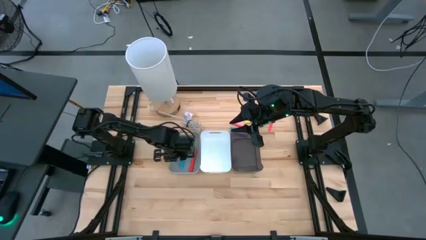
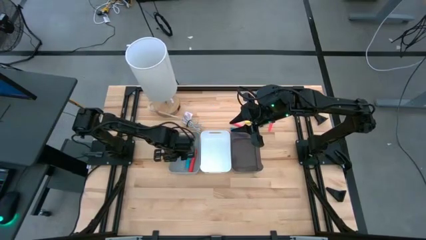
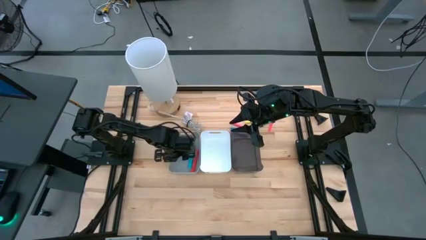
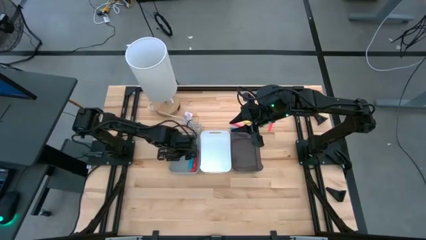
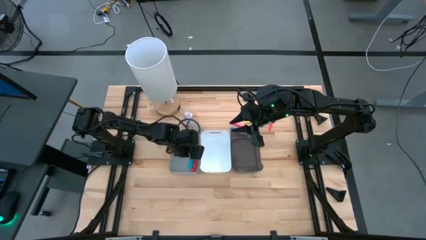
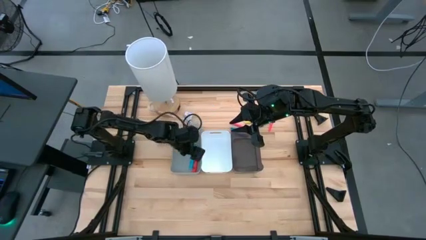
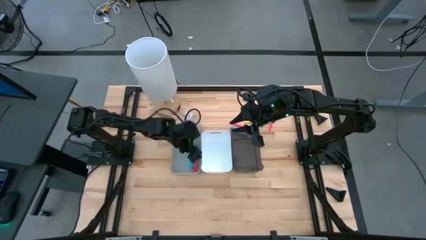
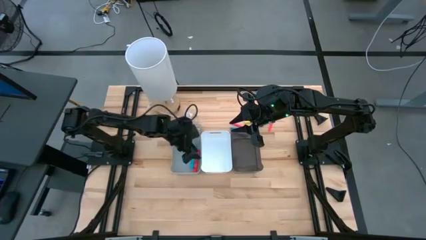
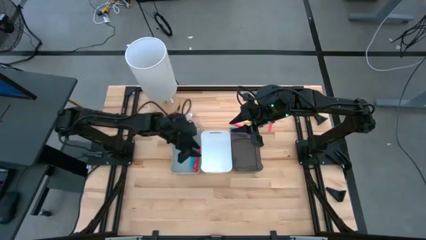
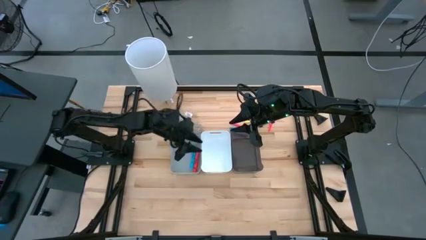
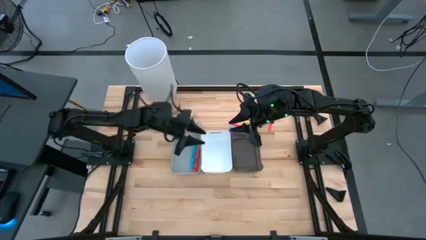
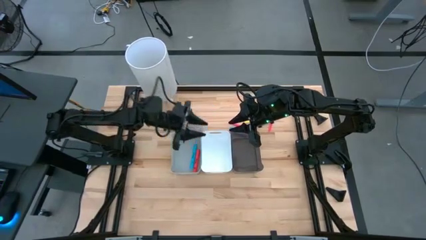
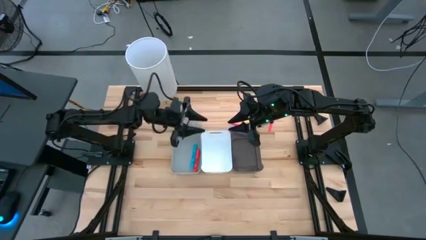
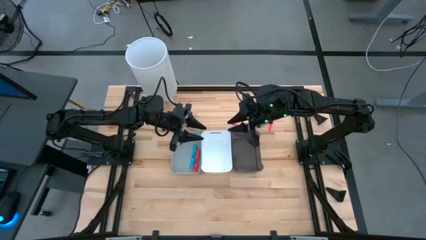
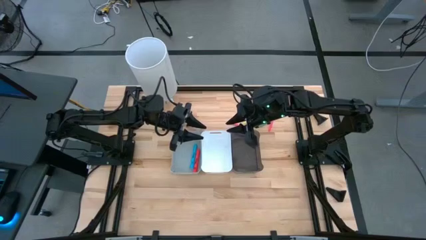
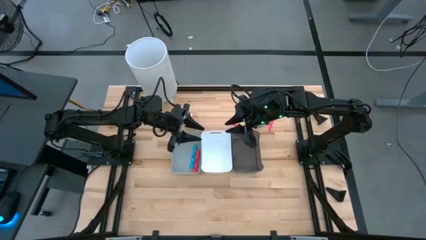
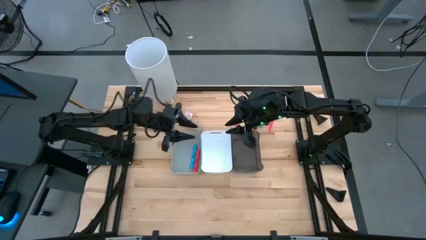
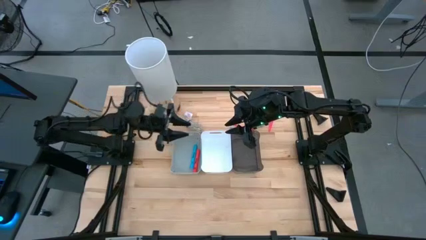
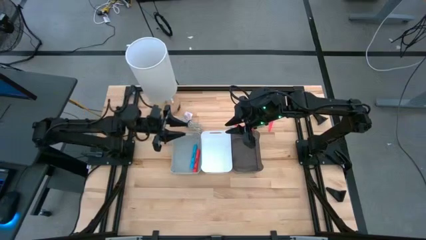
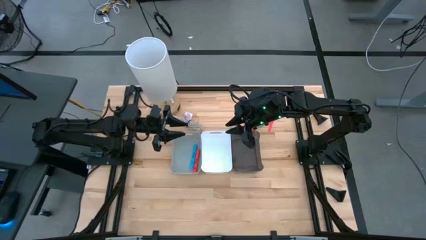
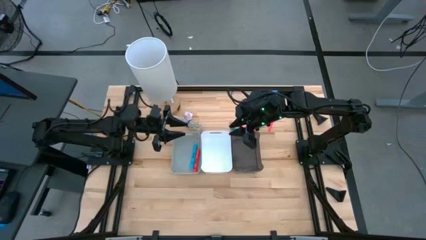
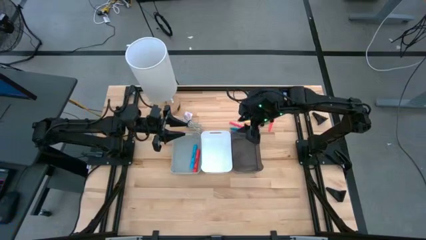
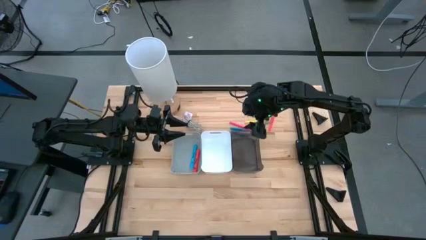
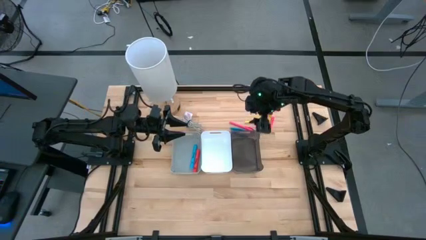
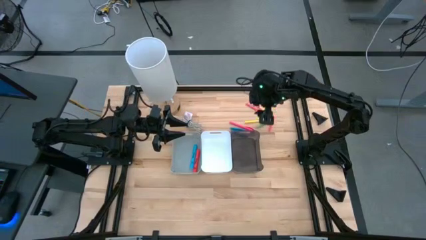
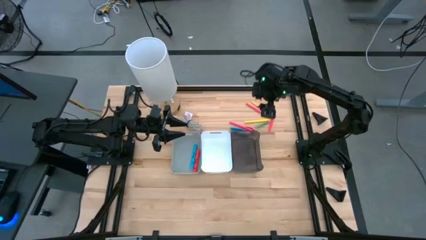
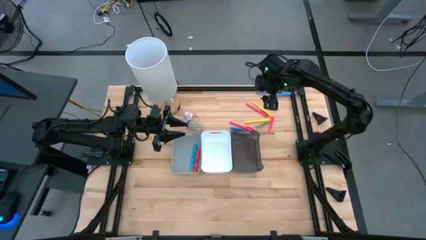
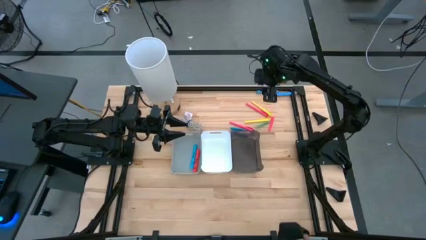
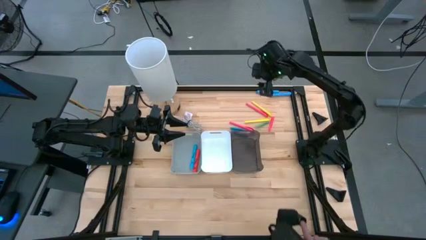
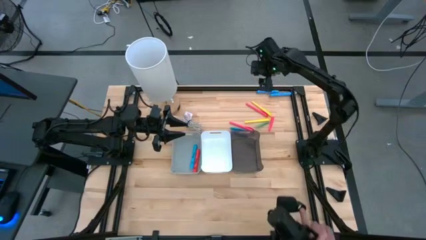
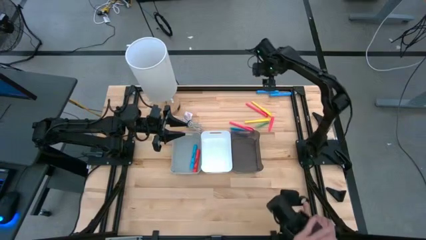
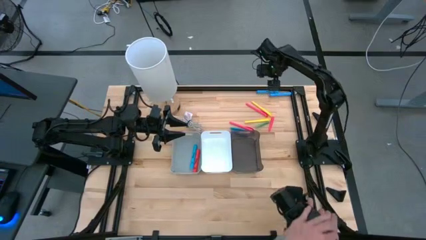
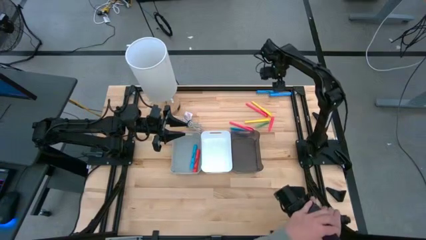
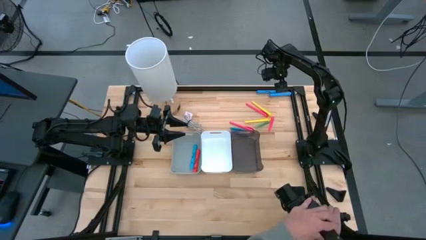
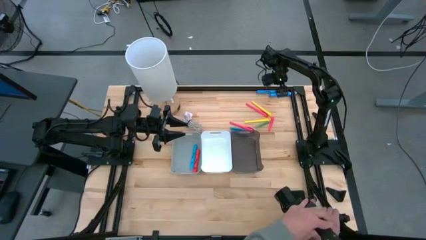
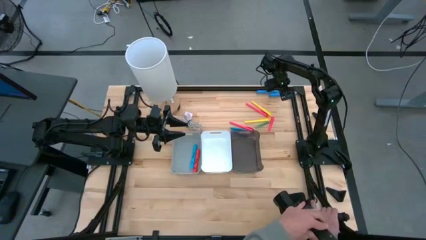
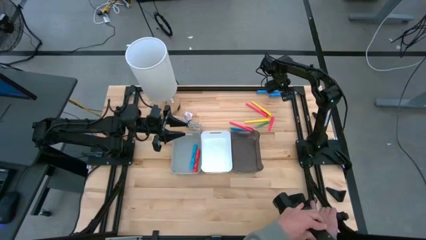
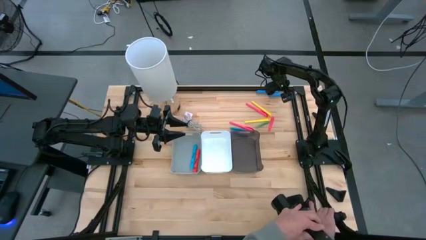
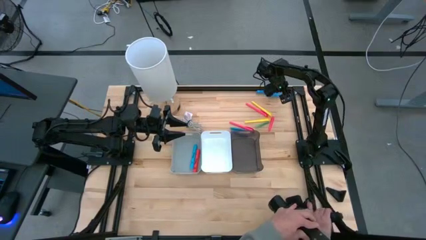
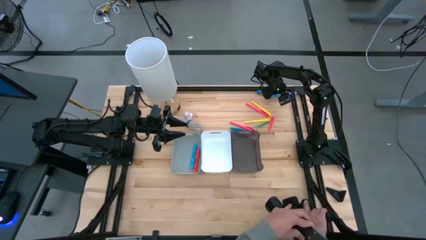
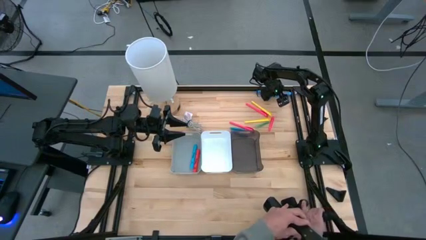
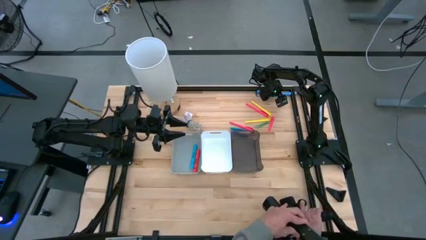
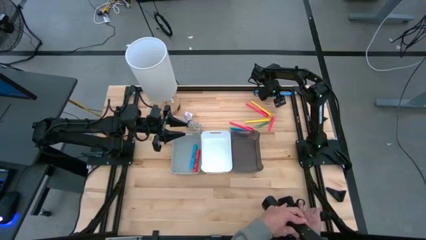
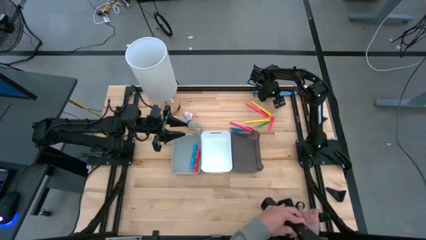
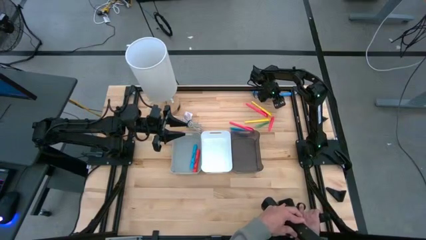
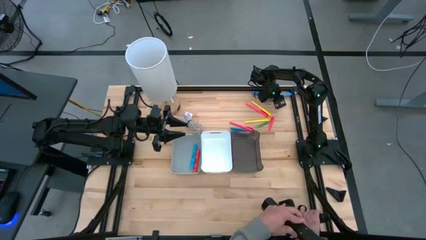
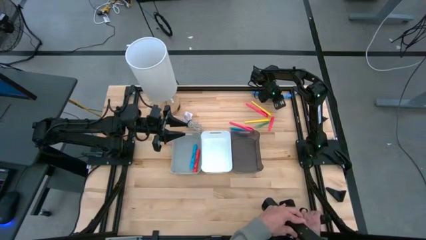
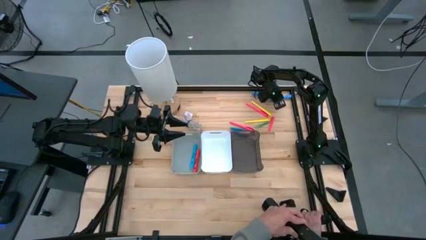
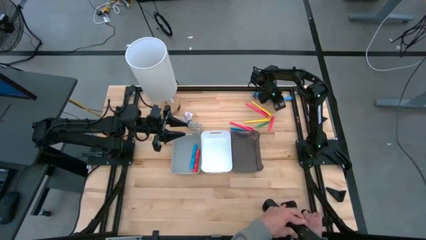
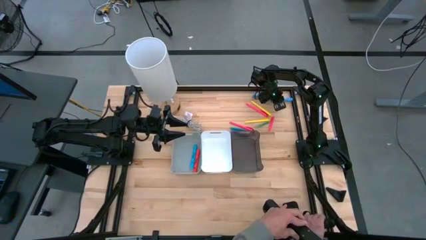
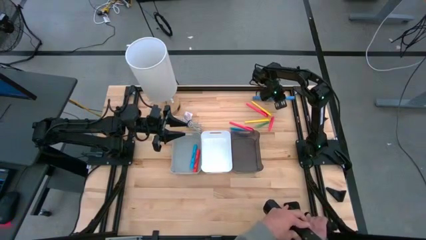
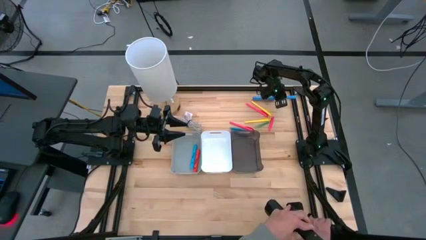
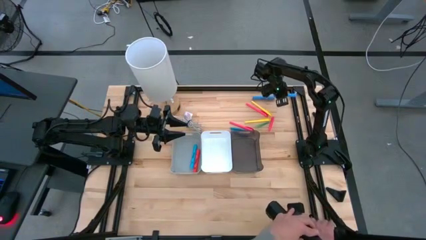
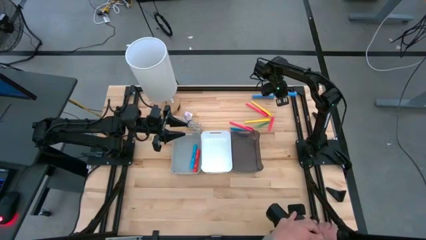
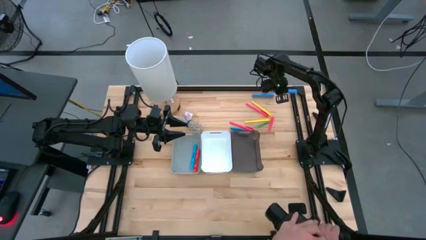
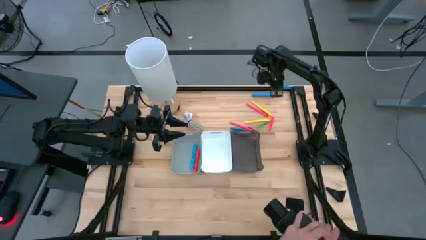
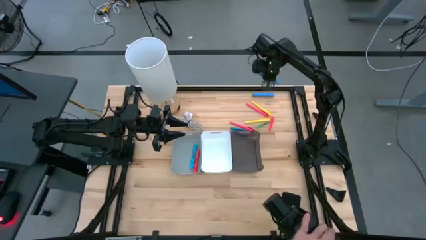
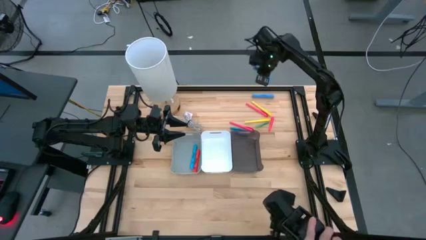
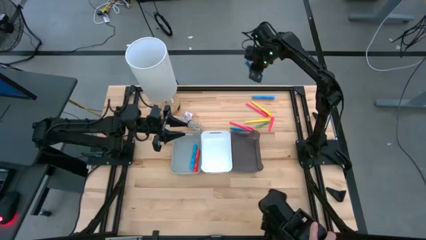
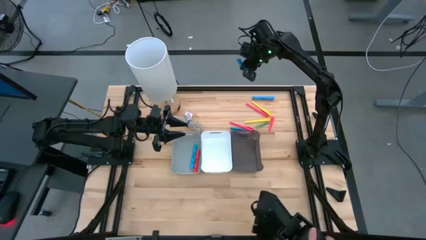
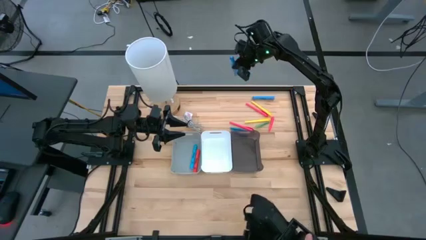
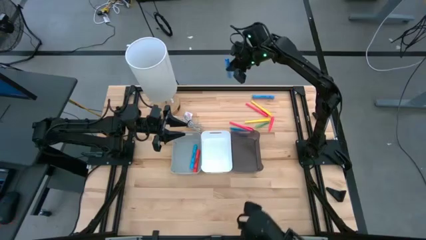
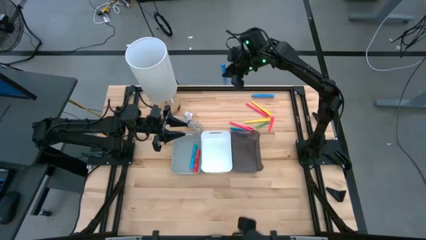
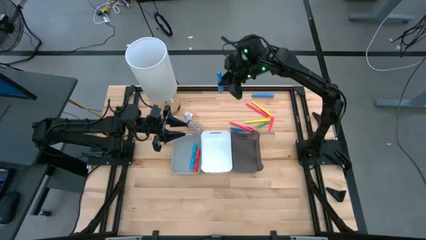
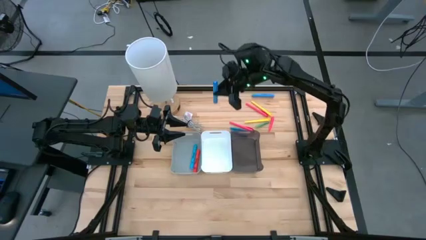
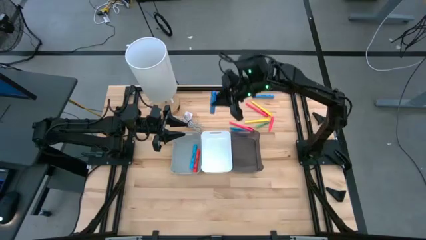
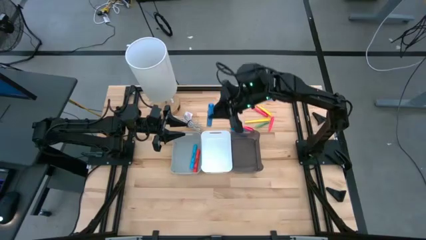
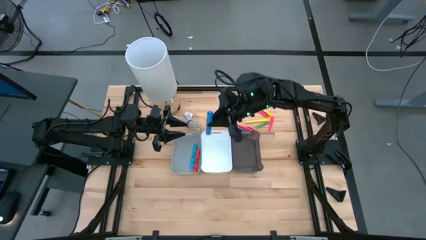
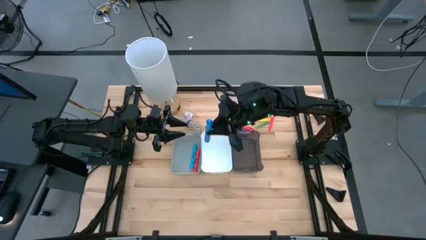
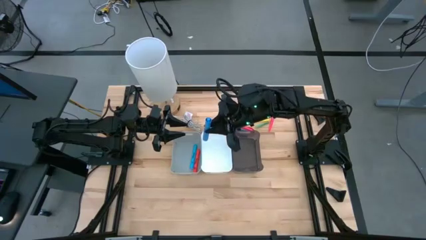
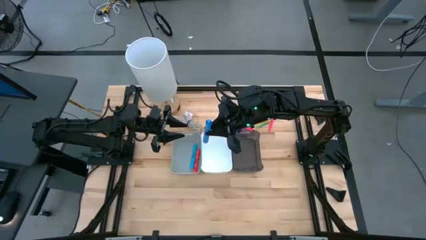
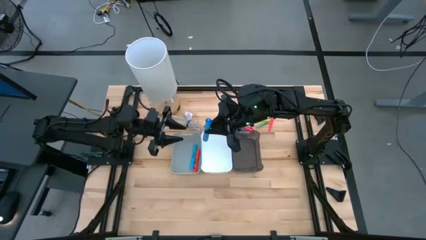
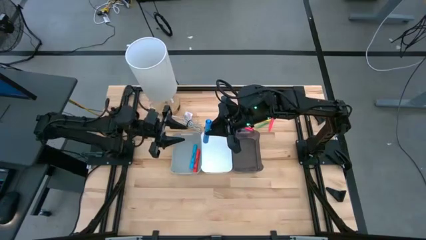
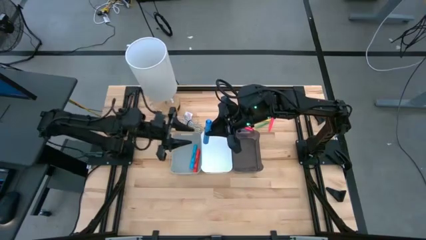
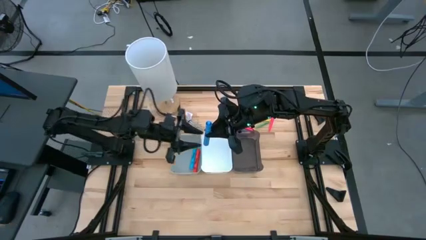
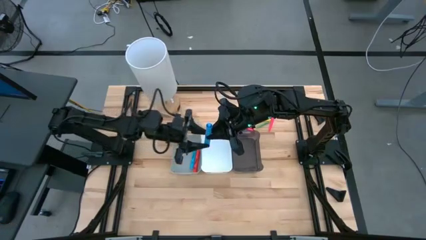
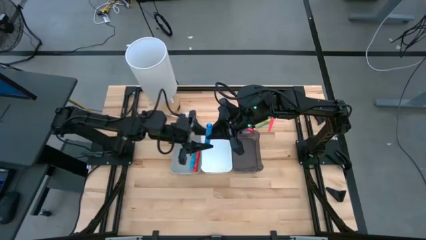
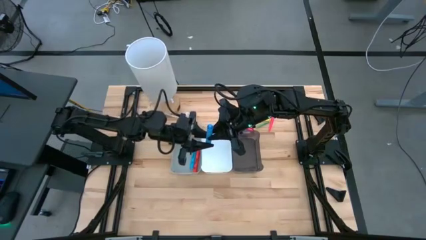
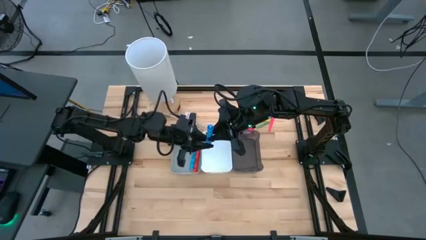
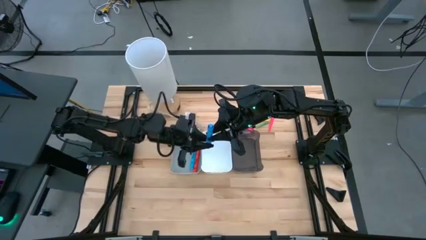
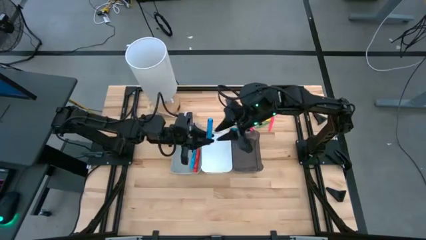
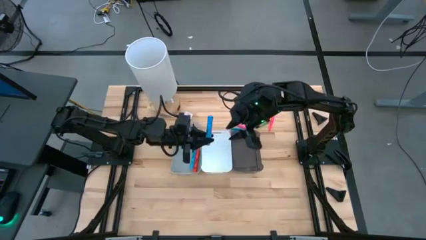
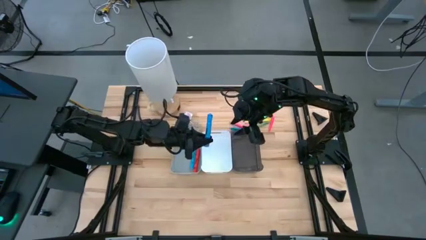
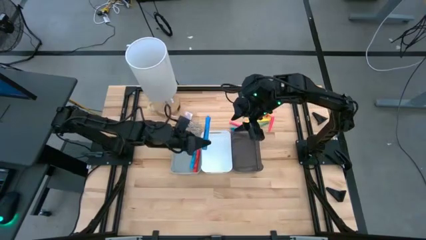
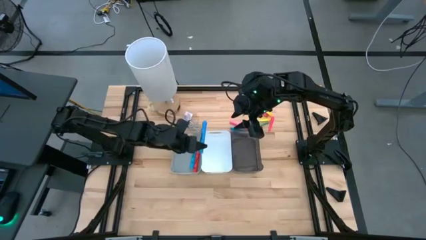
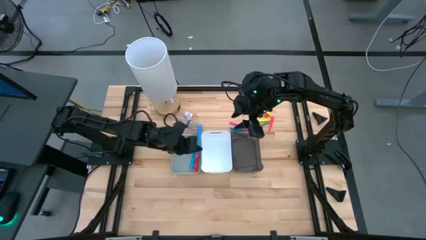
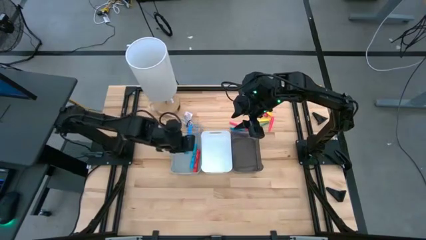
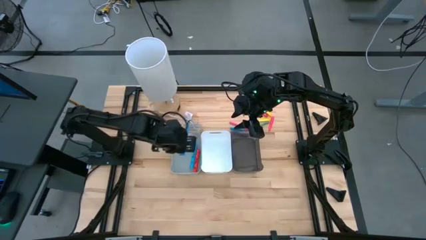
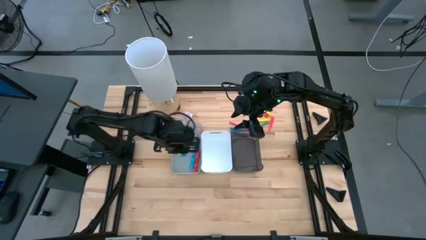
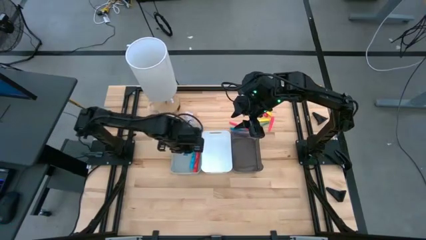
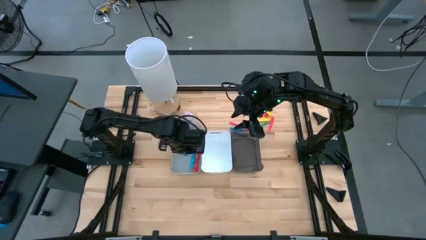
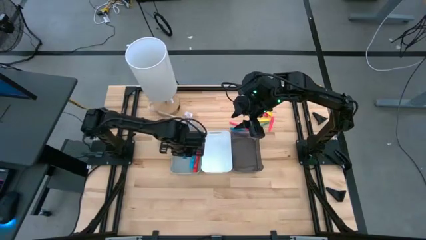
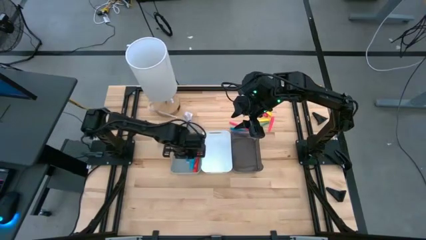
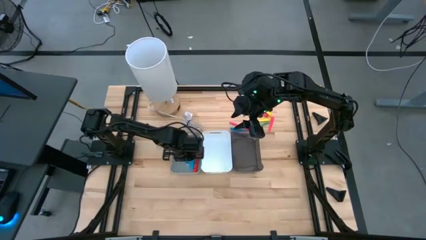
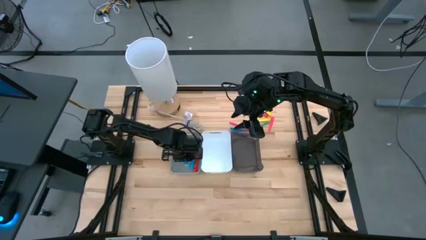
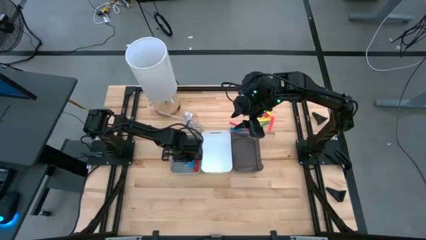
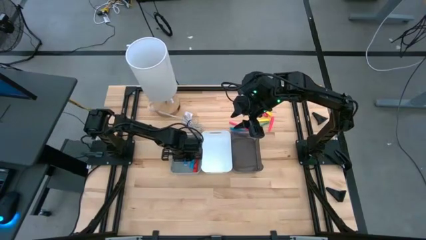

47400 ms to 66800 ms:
Task: Pick & Place Markers
Put the bottom blue marker into the gray bin
